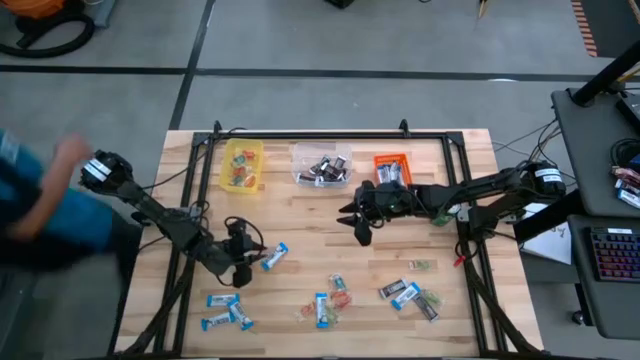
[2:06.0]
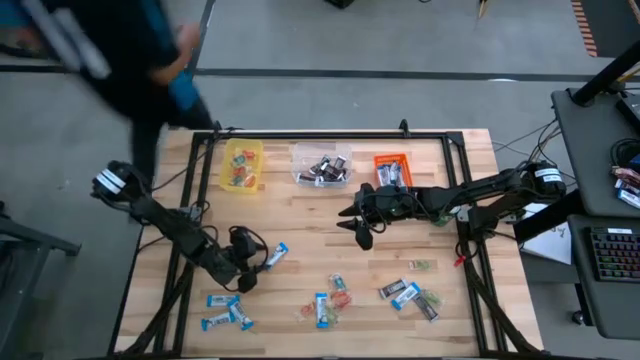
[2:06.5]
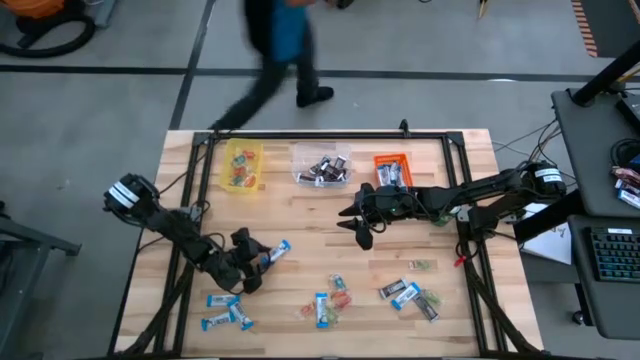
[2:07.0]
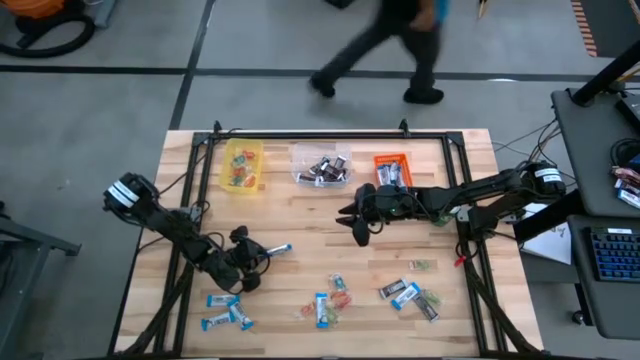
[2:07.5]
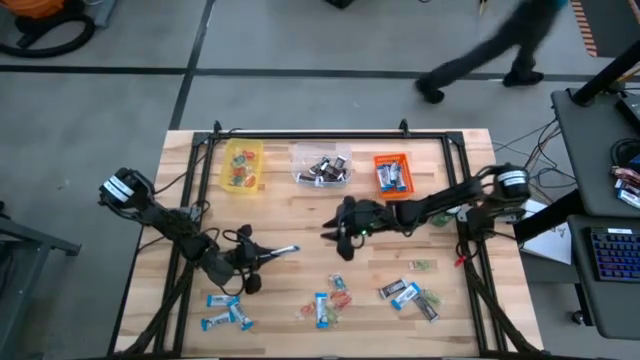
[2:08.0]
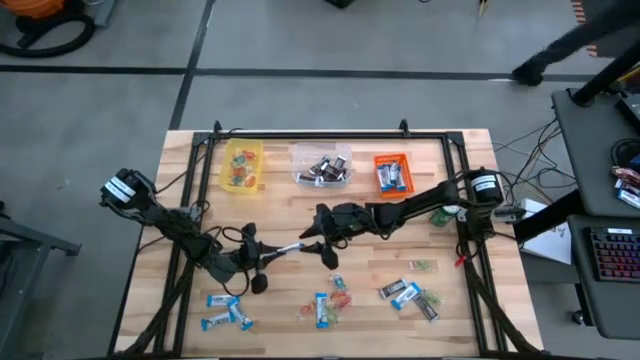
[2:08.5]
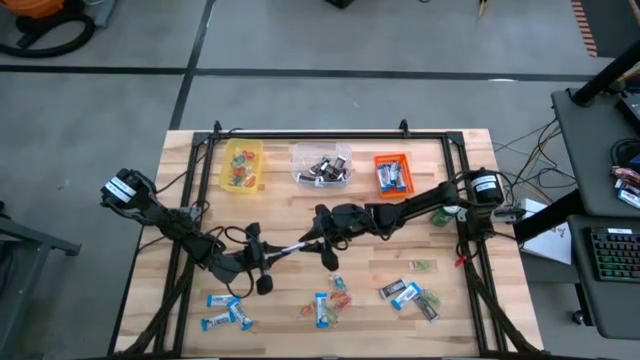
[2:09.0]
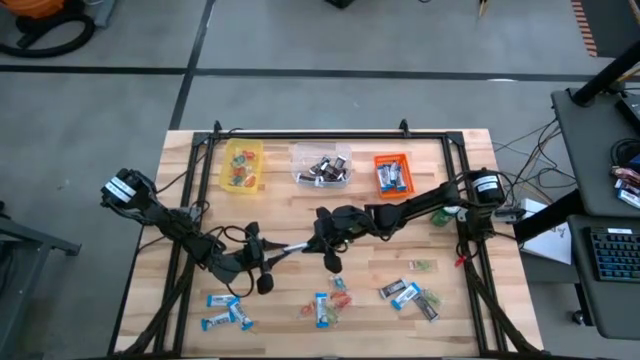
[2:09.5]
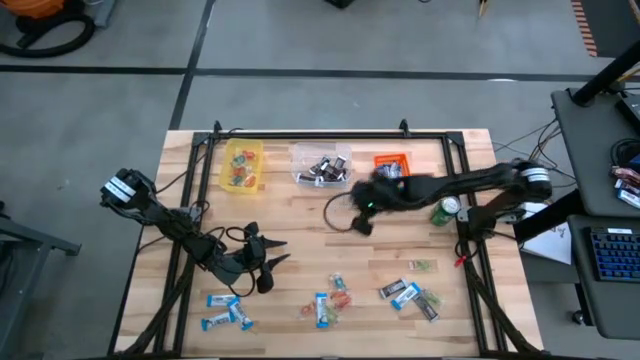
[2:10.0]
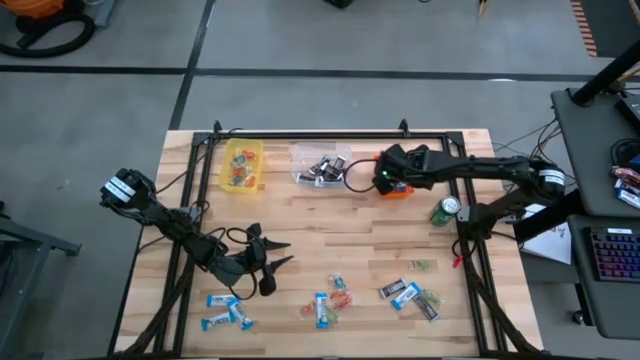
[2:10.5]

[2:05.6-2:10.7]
Task: Organize candy in baskets
Put the white chocolate bar chocolate into the orange bin

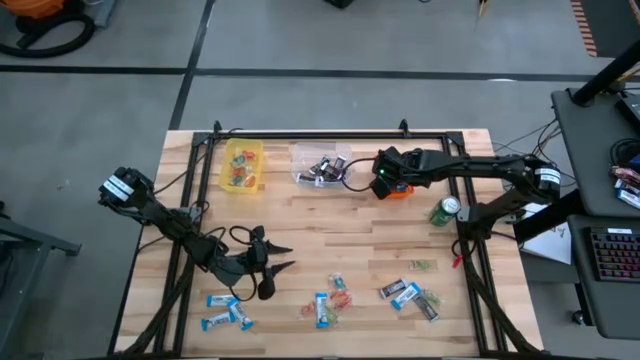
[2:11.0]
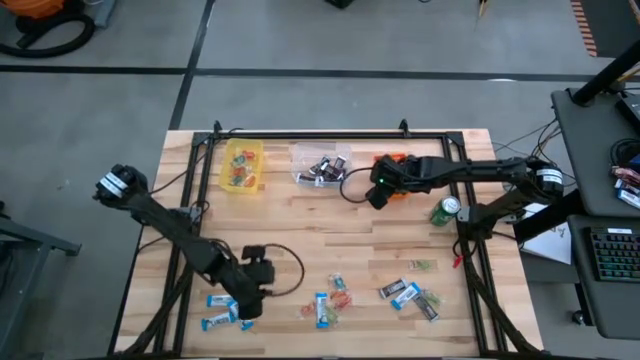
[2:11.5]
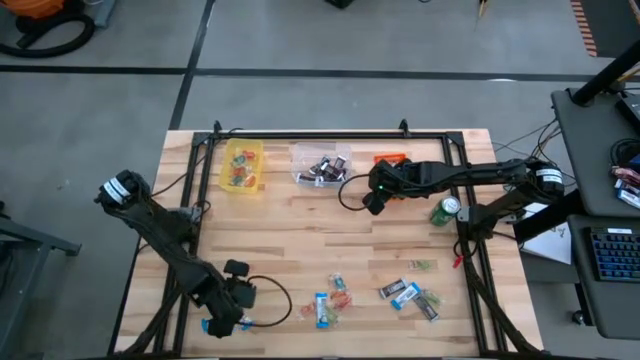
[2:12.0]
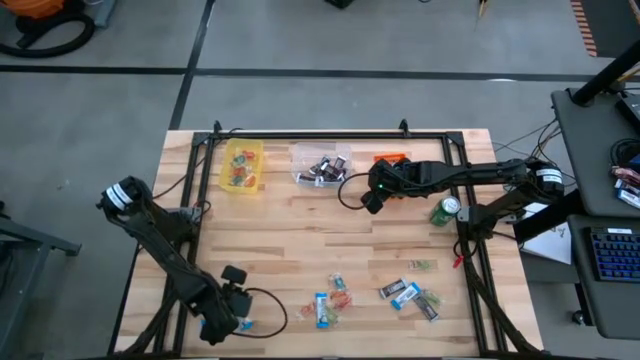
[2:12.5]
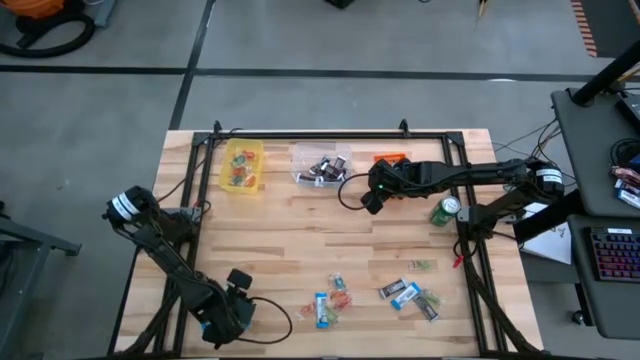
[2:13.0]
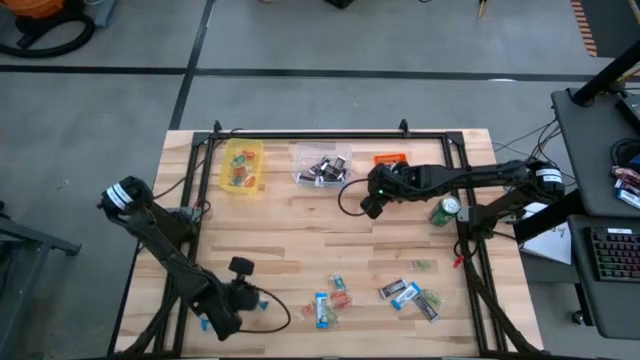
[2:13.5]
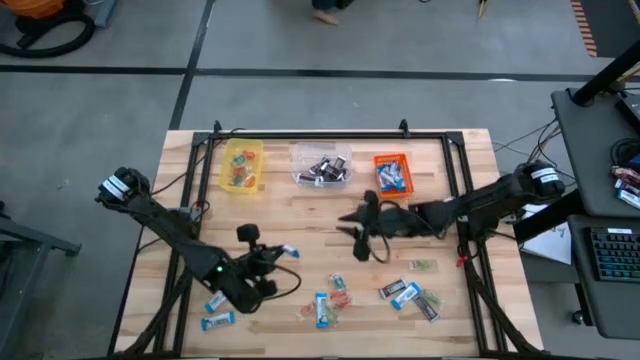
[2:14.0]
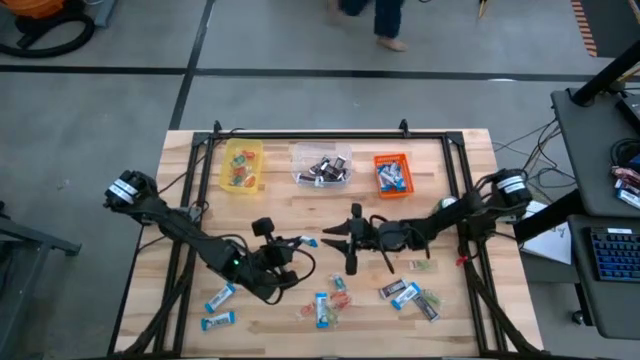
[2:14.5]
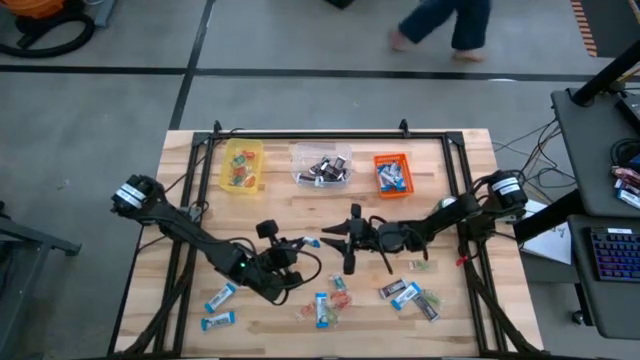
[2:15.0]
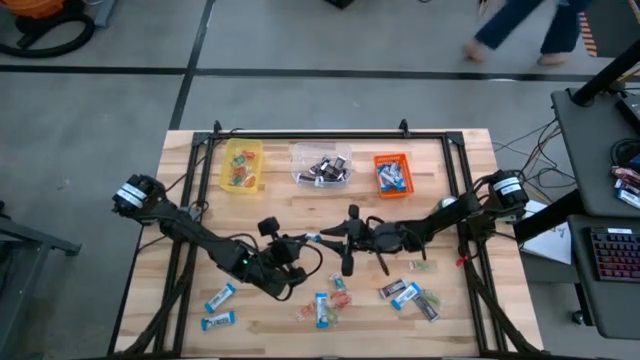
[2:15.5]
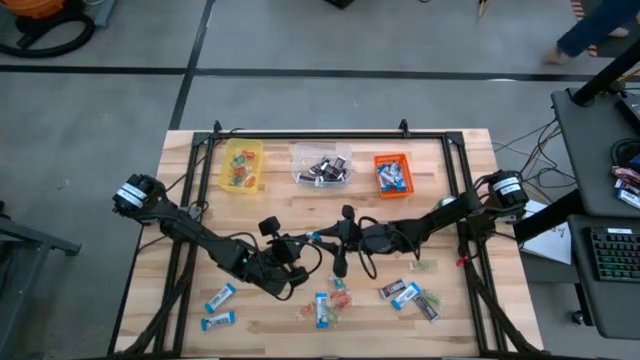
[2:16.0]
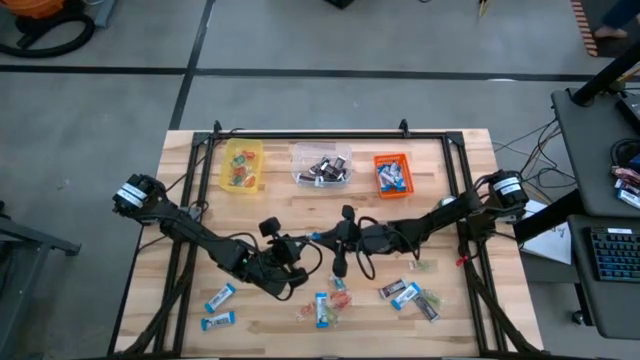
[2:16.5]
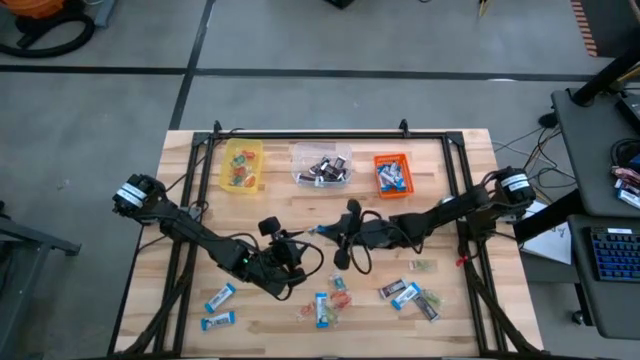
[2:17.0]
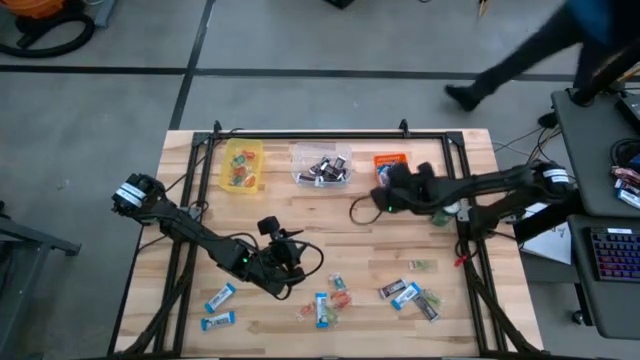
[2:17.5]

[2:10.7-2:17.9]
Put the white chocolate bar chocolate into the orange bin

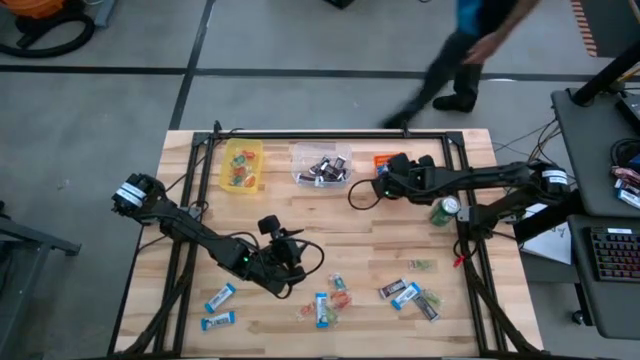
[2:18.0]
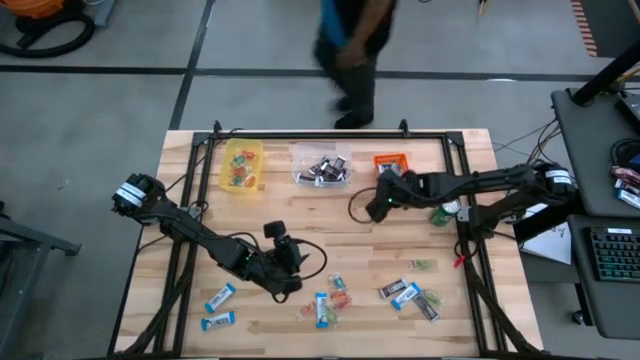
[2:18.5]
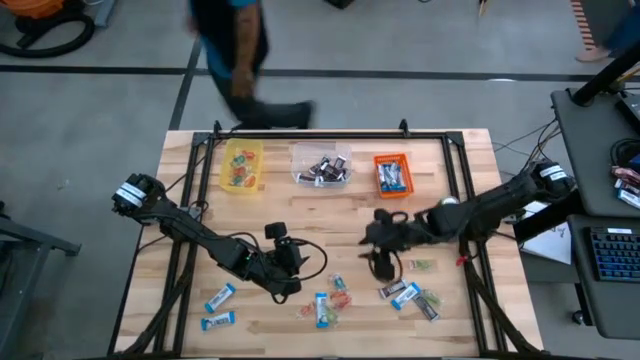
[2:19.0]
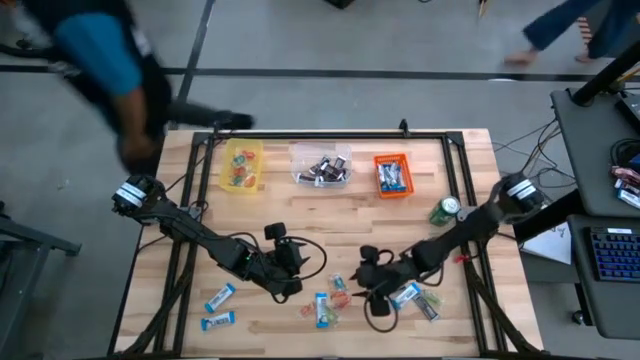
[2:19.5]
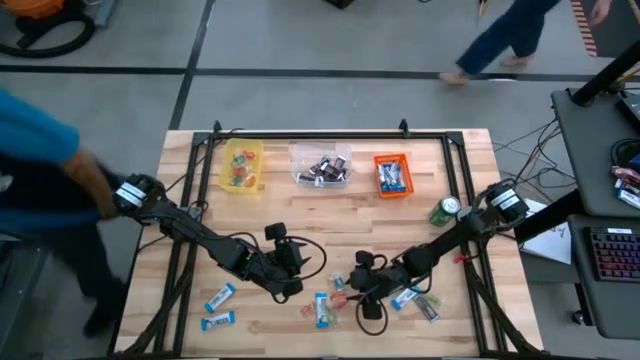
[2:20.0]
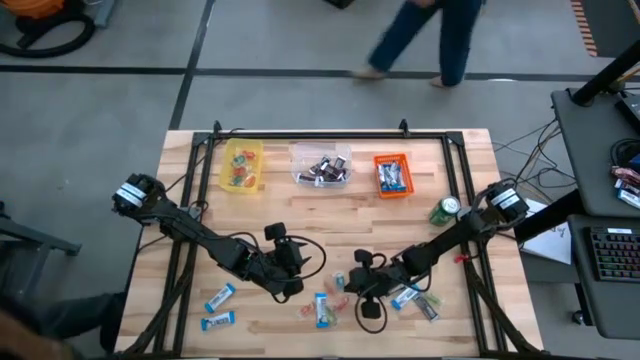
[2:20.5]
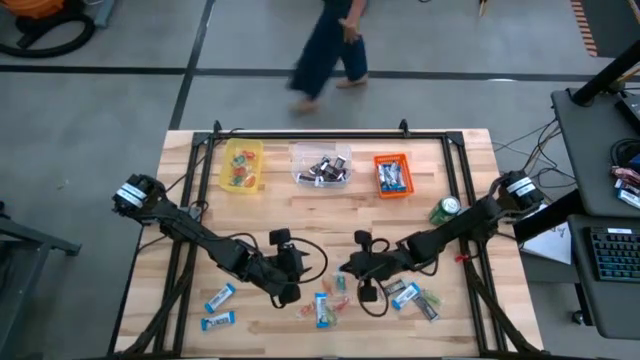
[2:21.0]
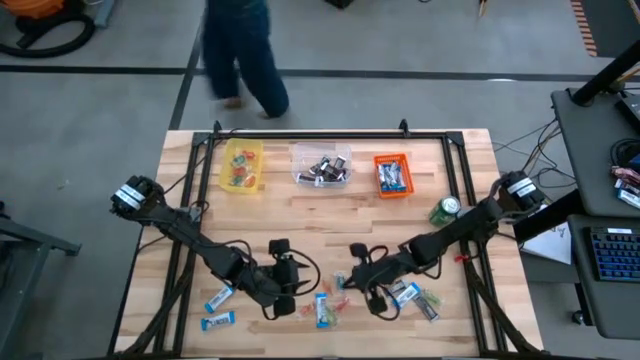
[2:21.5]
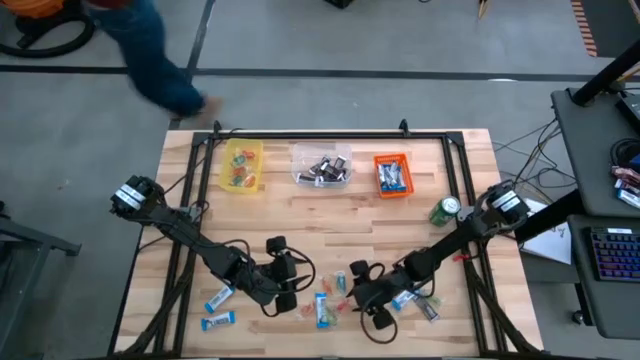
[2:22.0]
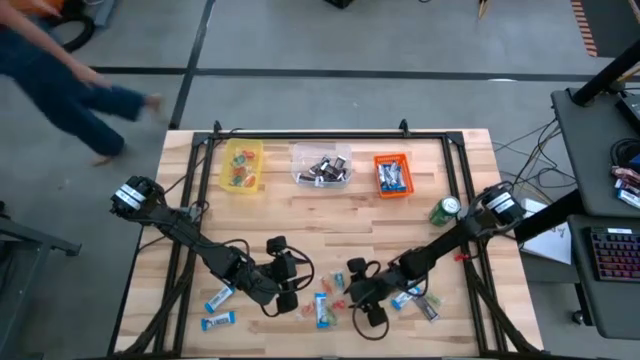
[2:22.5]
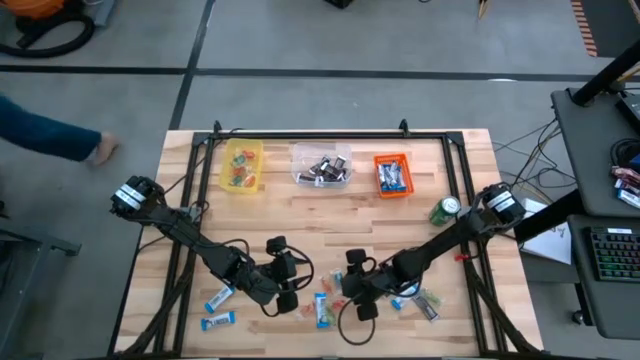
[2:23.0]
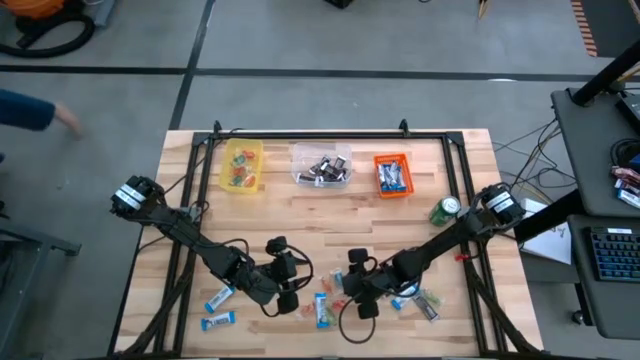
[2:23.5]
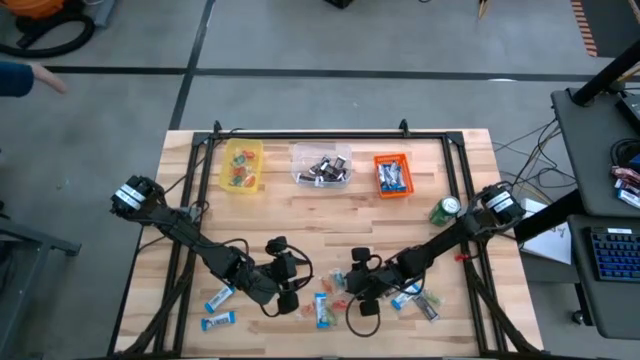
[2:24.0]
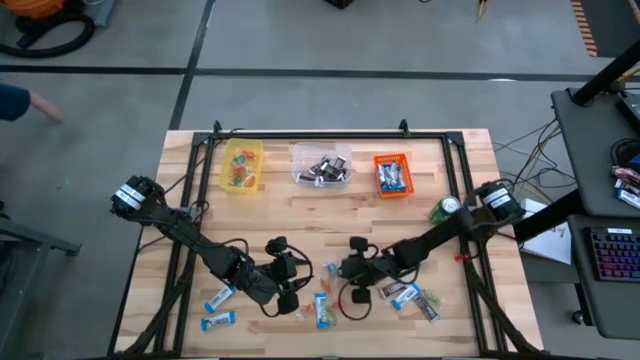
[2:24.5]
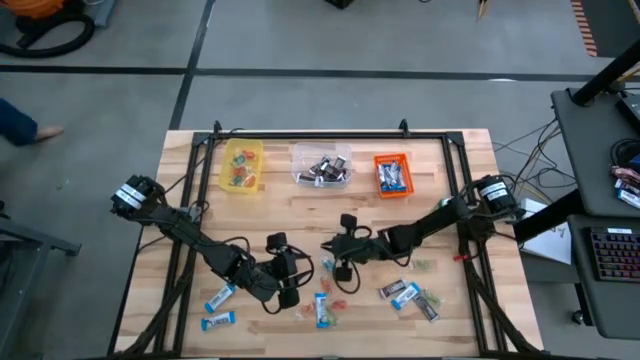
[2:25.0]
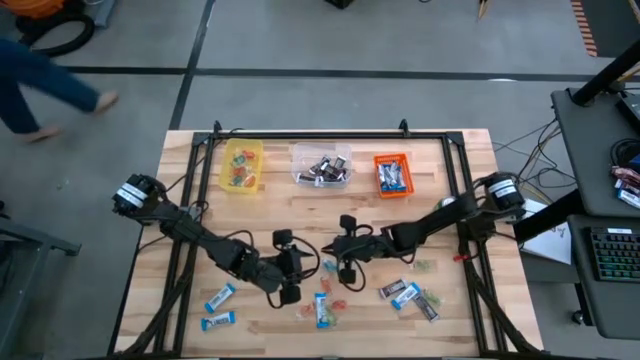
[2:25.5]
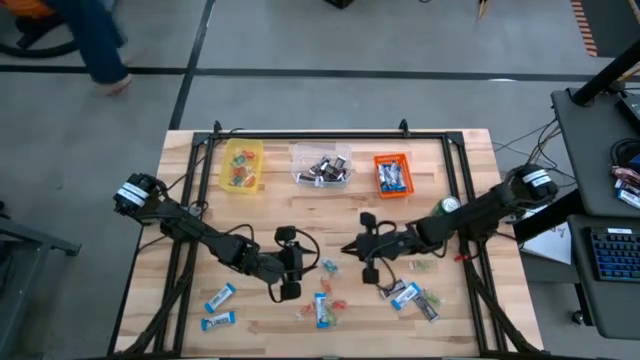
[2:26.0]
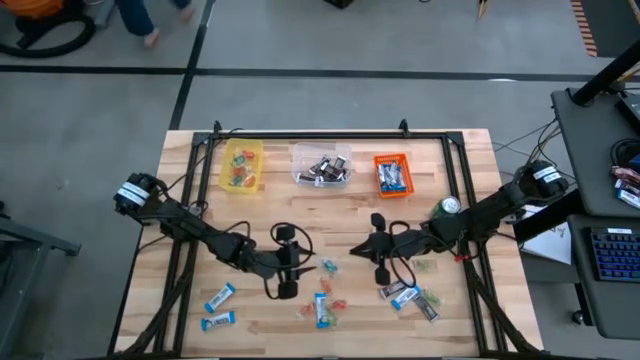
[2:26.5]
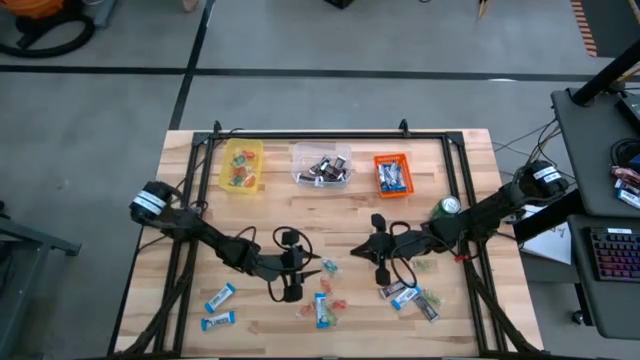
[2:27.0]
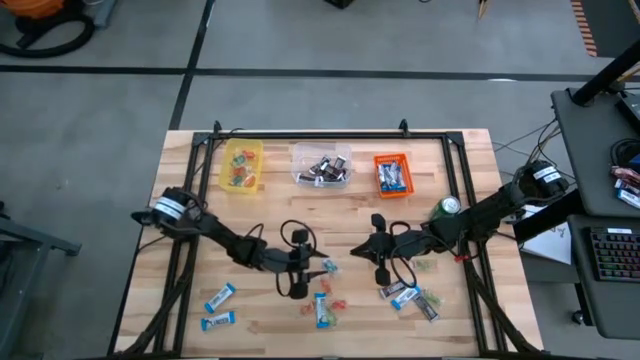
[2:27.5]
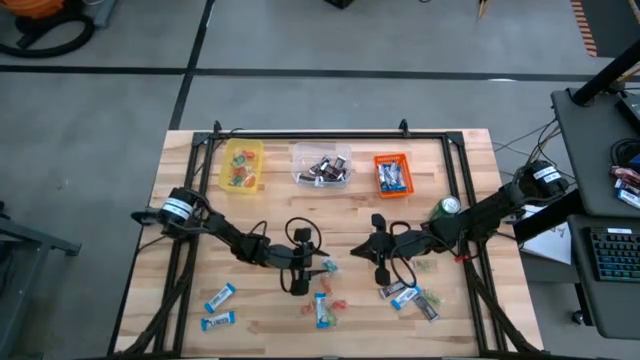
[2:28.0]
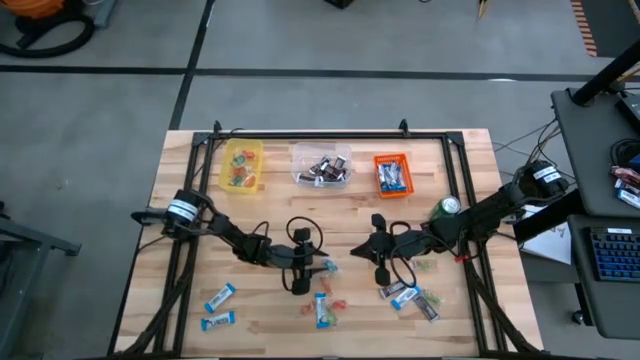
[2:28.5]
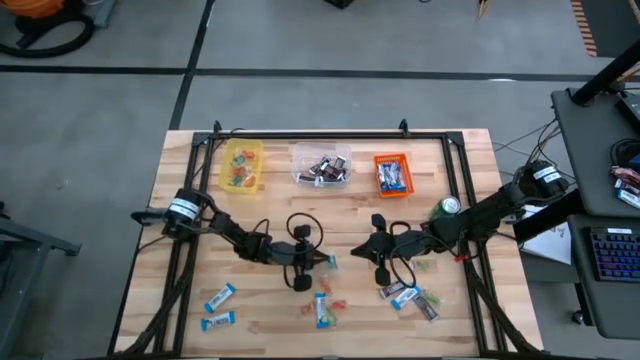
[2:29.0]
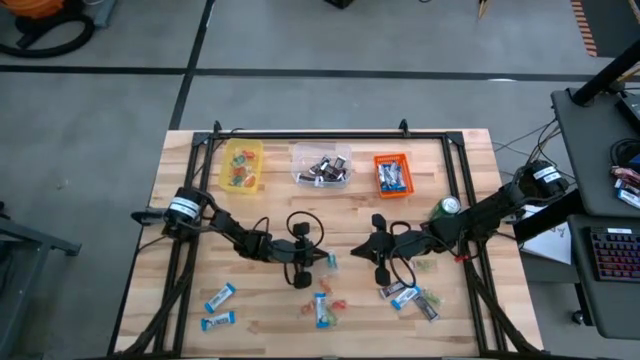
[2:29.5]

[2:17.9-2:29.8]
Put the blue gummy into the yellow bin
